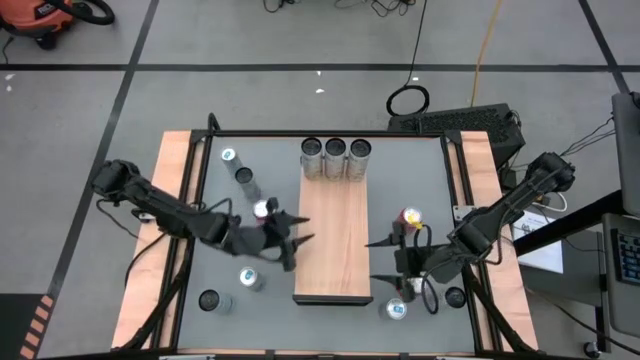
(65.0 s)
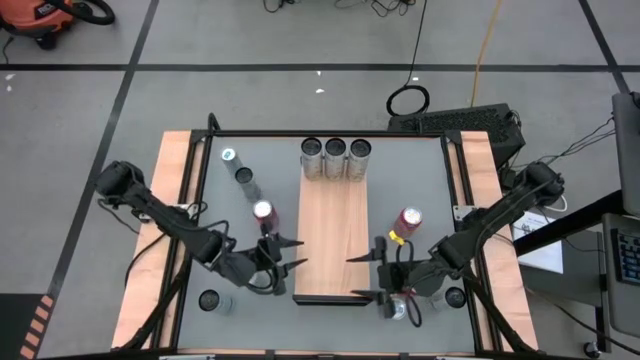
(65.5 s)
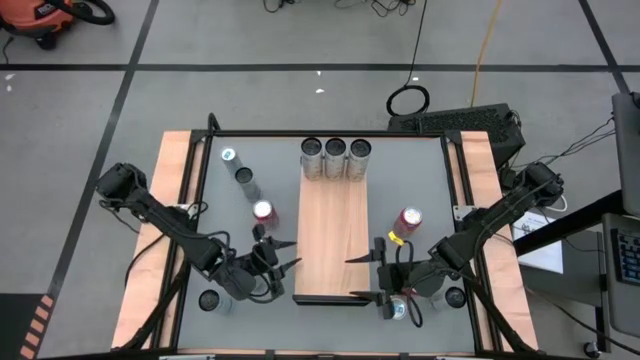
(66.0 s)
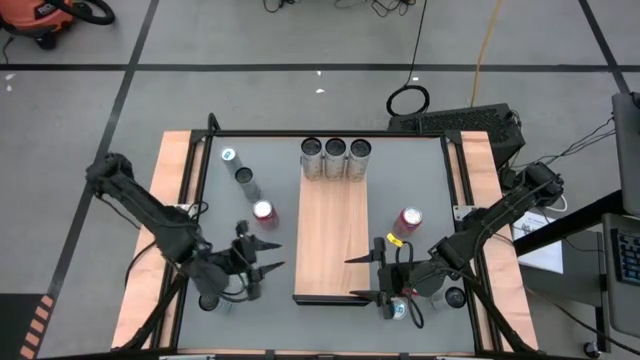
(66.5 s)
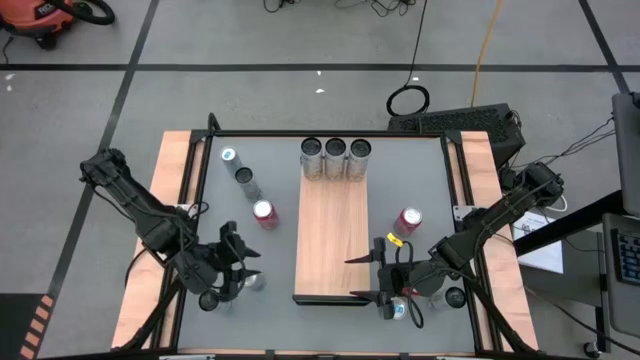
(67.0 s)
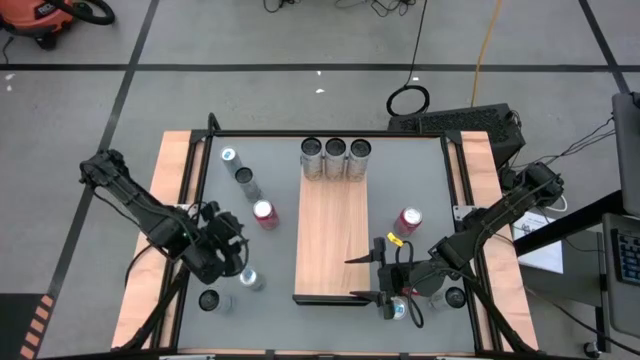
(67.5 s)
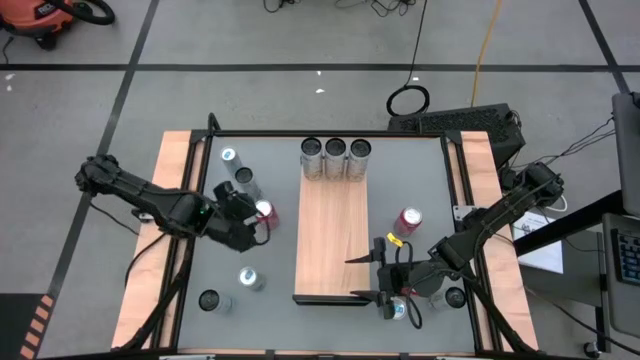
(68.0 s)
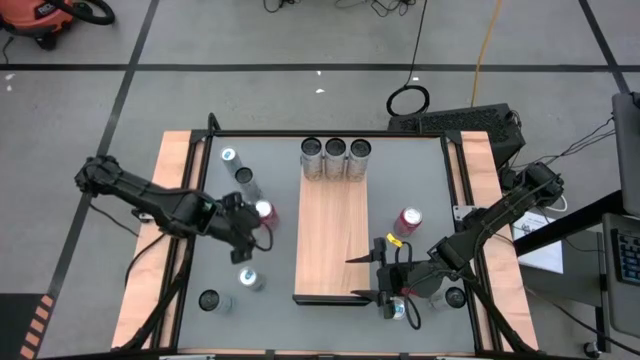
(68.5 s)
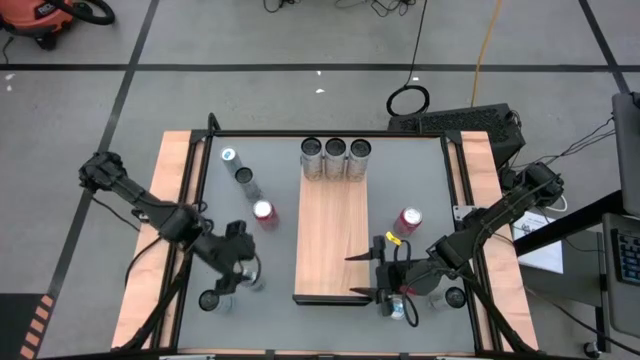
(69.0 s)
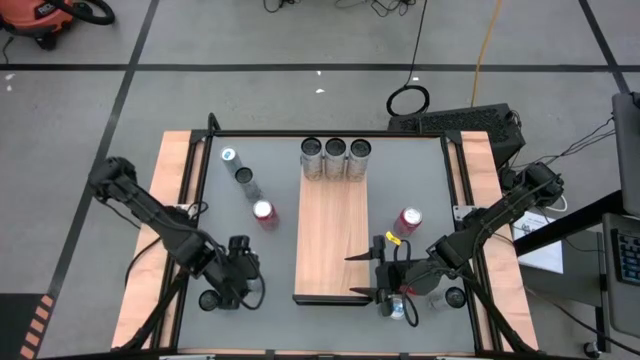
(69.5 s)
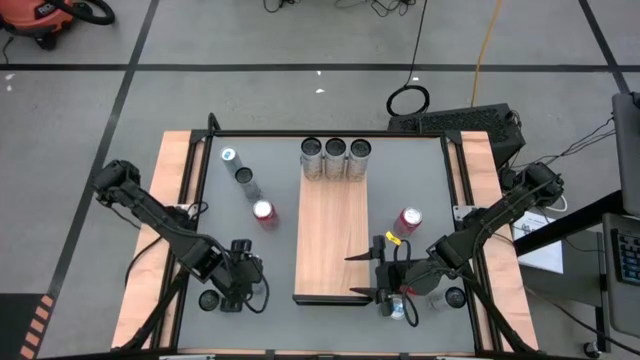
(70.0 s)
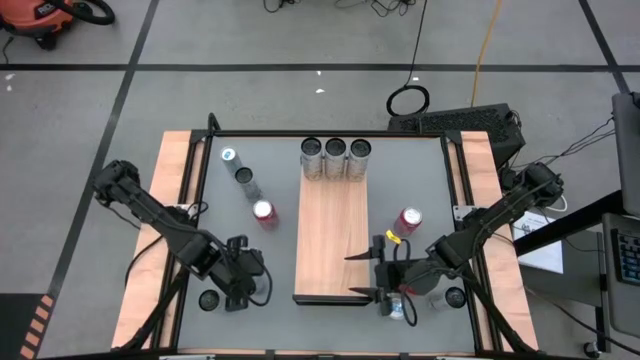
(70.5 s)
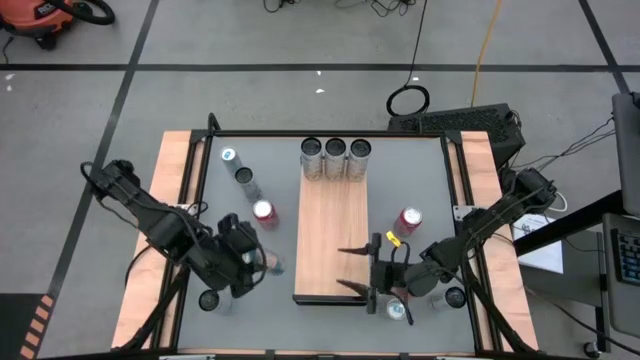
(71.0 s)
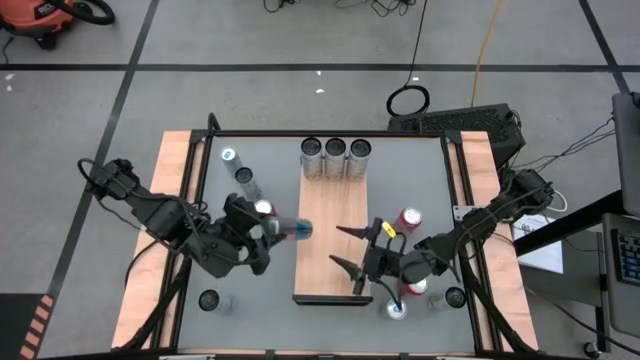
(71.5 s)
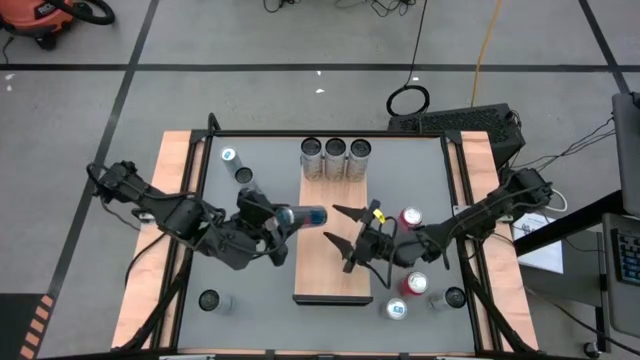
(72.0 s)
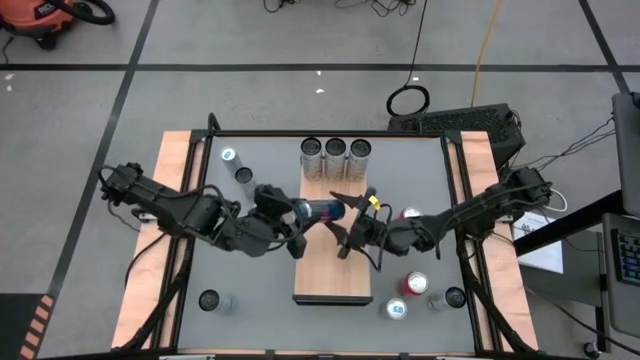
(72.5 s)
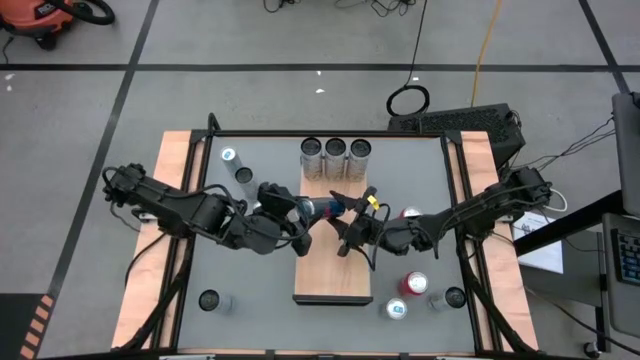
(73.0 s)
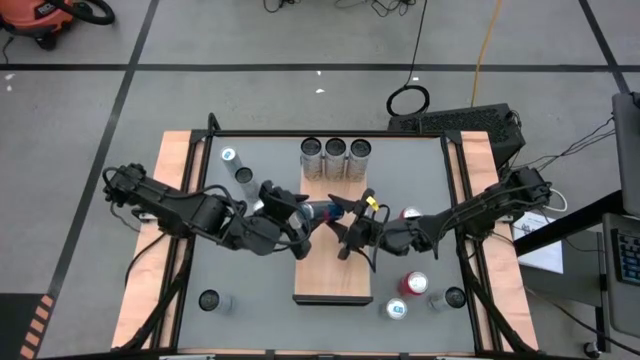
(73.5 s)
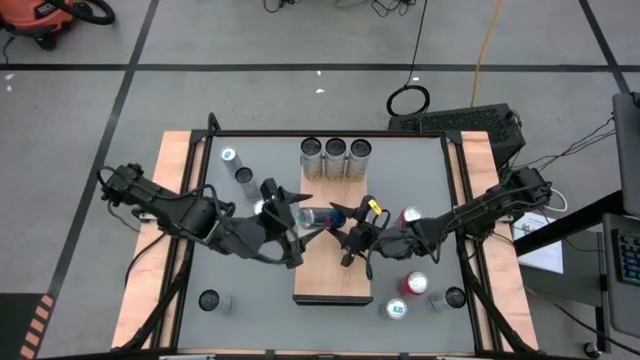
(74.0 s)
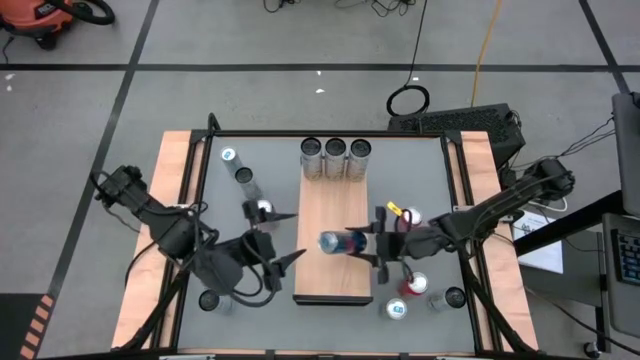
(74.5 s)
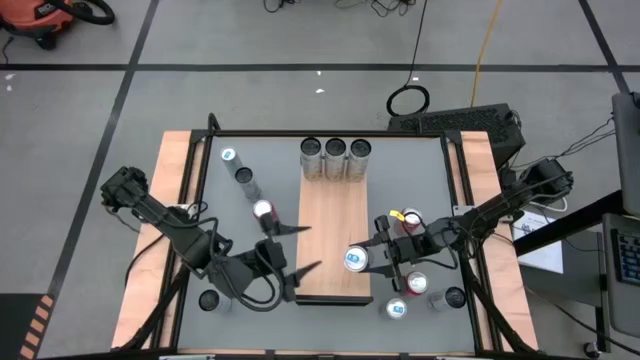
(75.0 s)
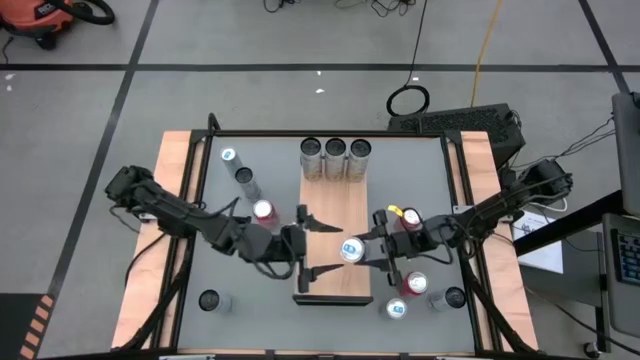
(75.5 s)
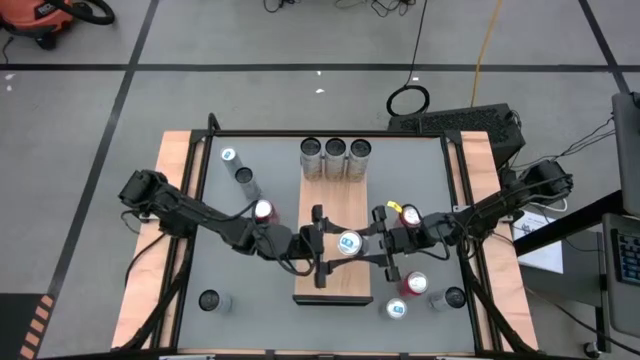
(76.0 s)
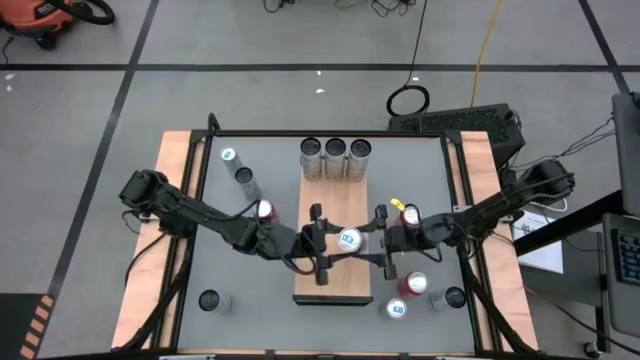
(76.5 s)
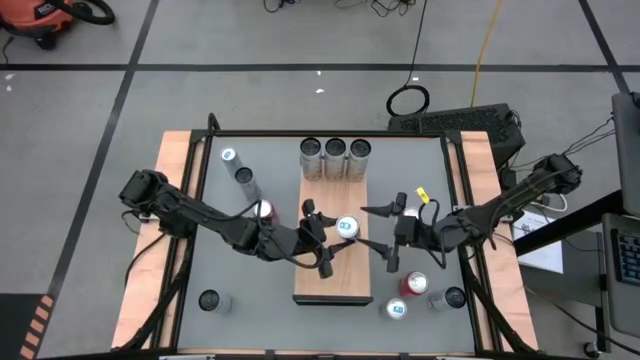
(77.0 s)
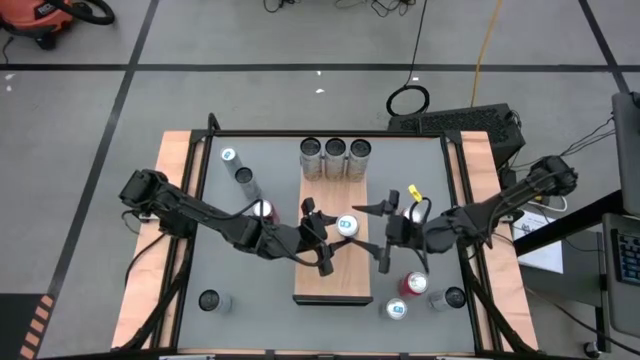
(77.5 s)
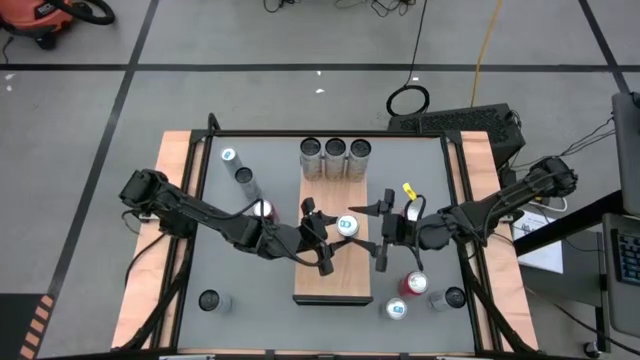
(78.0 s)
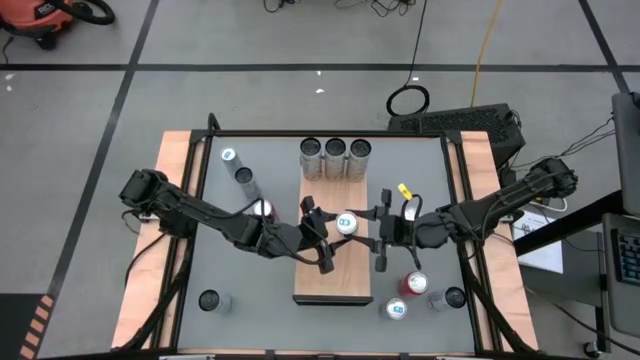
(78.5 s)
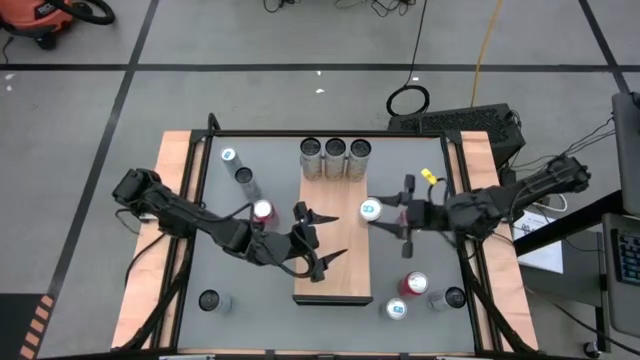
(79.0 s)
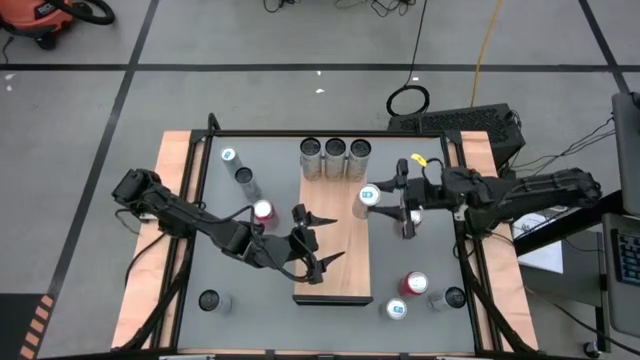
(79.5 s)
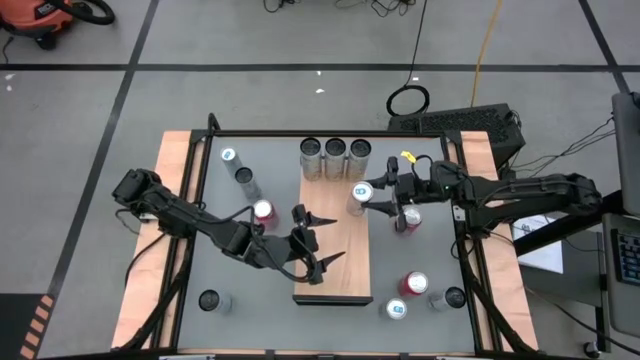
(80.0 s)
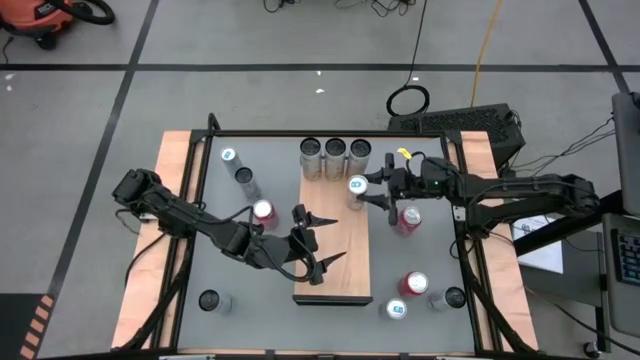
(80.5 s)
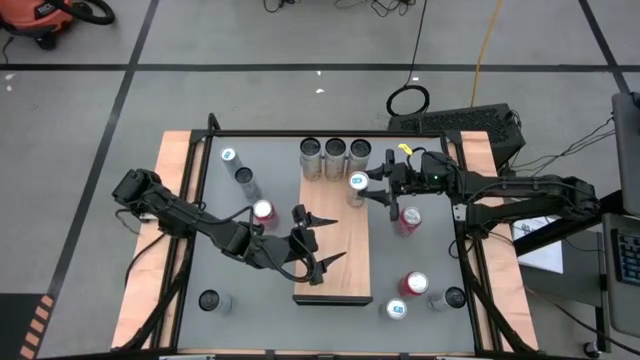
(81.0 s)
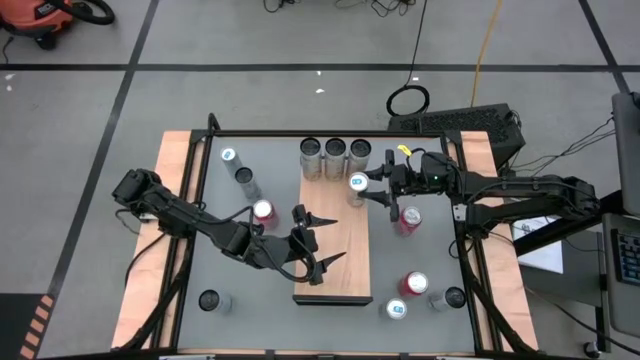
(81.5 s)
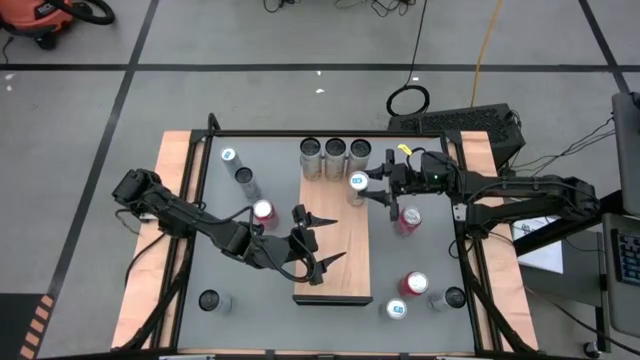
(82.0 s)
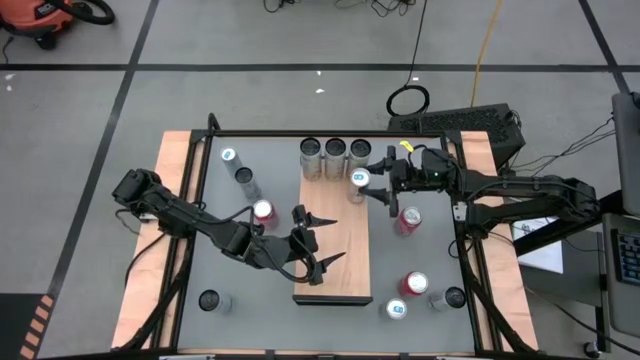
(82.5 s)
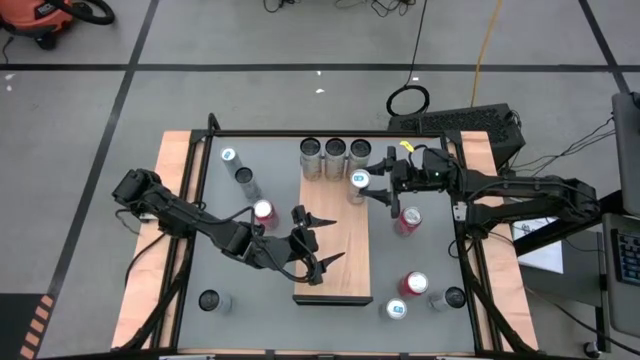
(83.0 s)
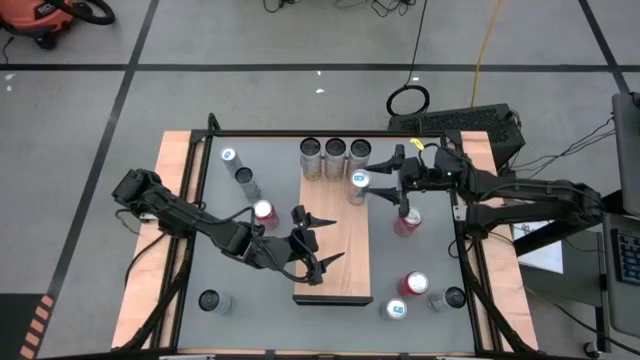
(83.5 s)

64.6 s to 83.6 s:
Task: Place canned beverage on shelf
Put the bottom left blue soda can on the shelf

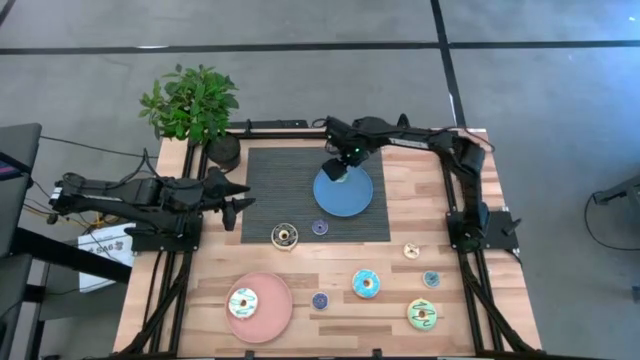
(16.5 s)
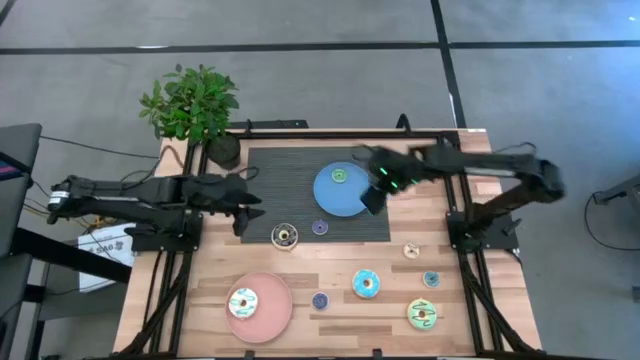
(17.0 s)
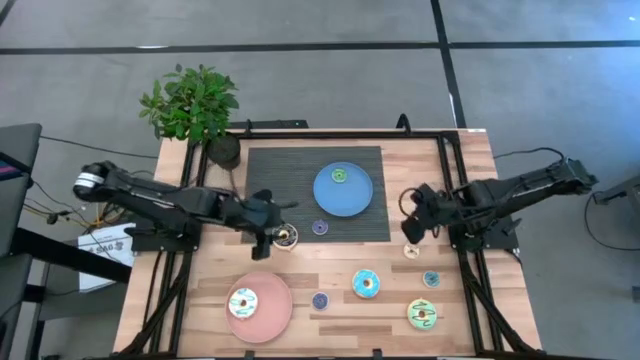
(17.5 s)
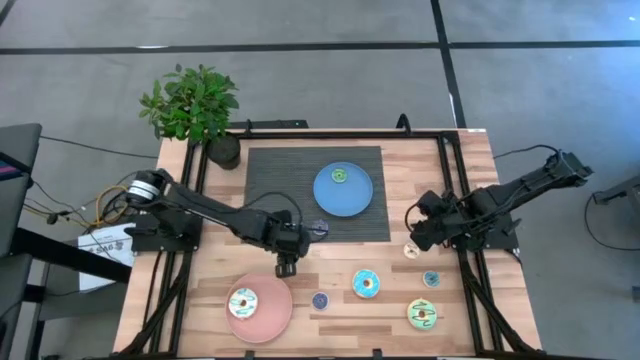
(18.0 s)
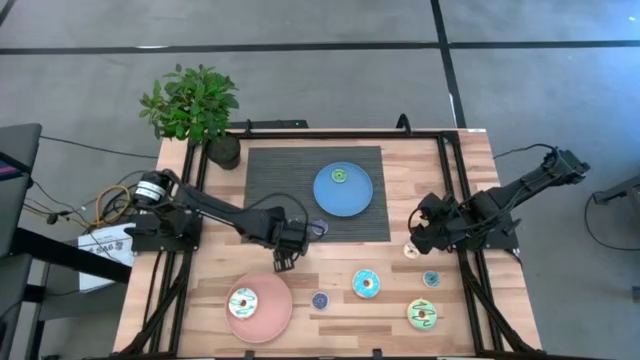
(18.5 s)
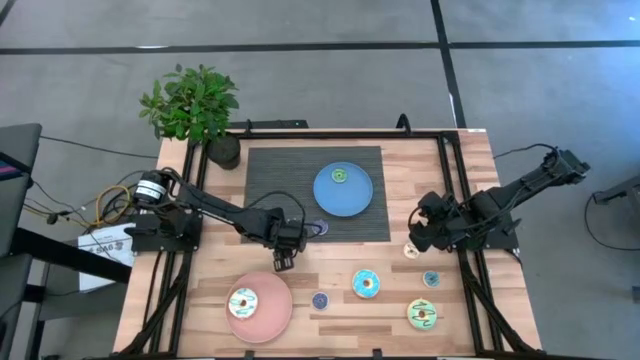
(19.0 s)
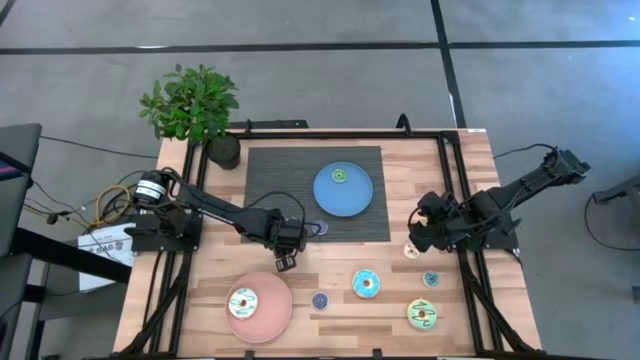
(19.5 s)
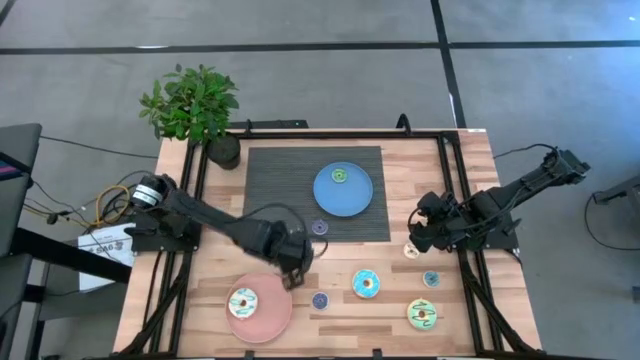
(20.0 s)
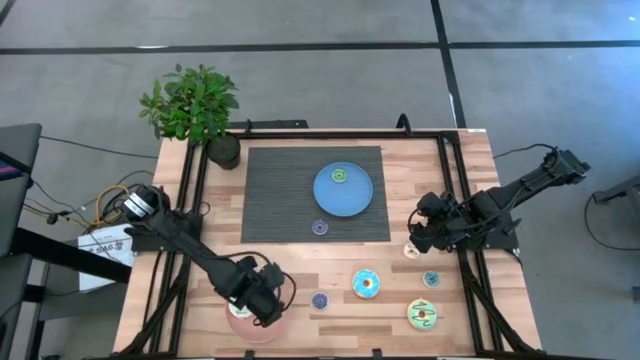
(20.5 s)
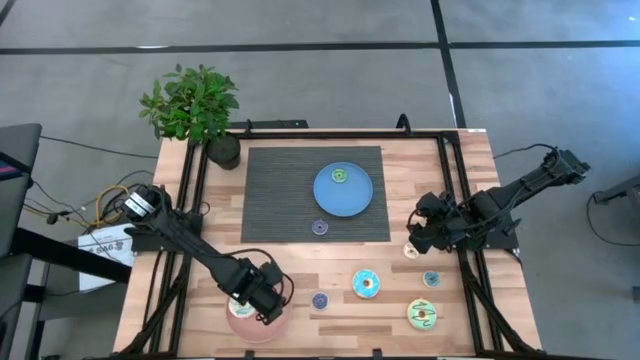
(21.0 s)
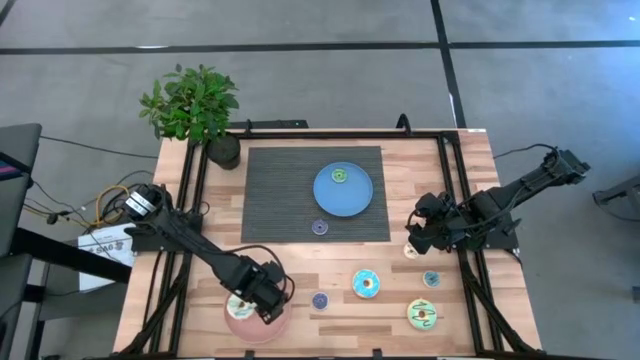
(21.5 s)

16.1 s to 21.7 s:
Task: Pick & Place donuts
Put the big black donut on the light orange plate
